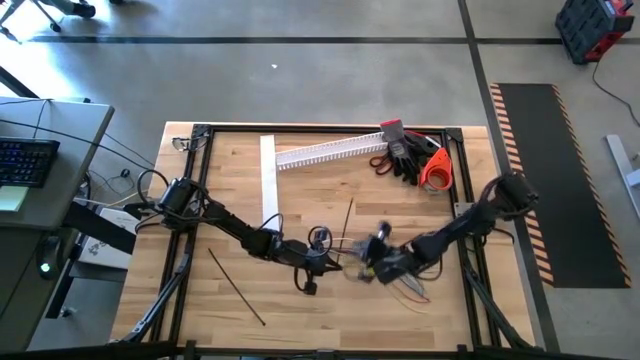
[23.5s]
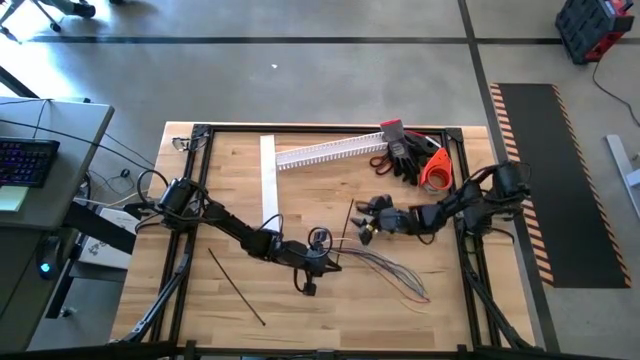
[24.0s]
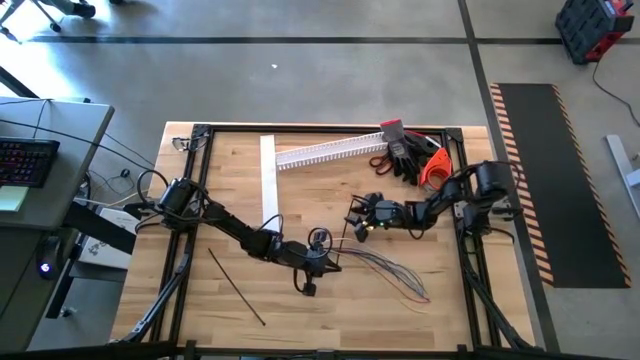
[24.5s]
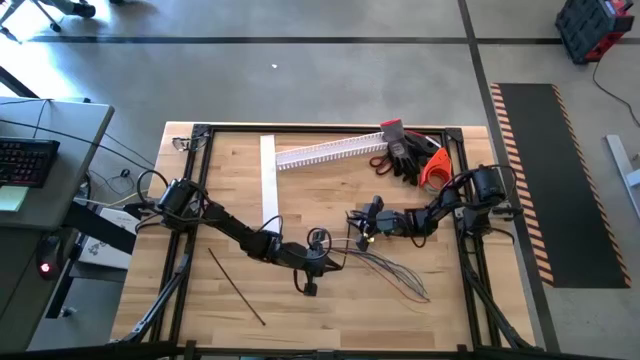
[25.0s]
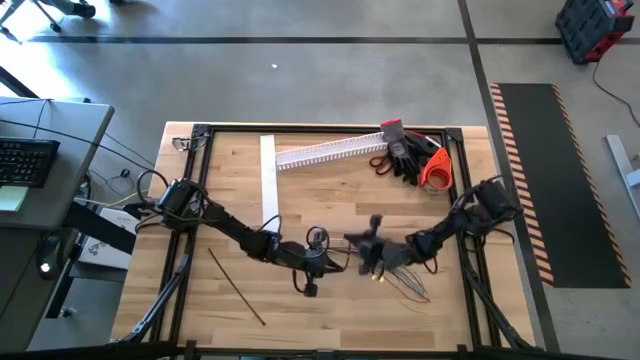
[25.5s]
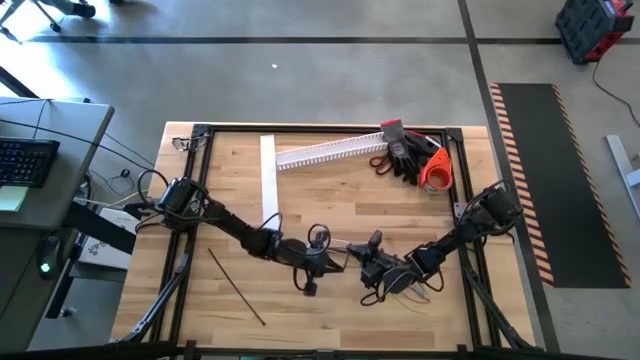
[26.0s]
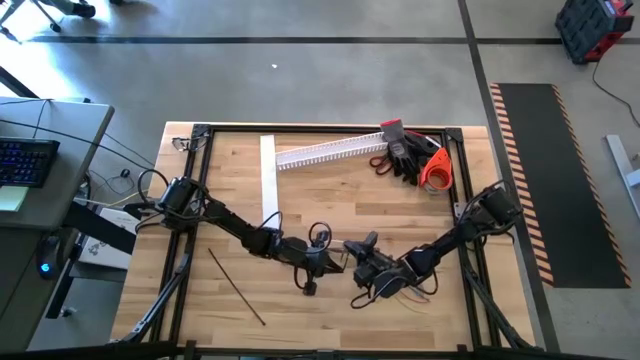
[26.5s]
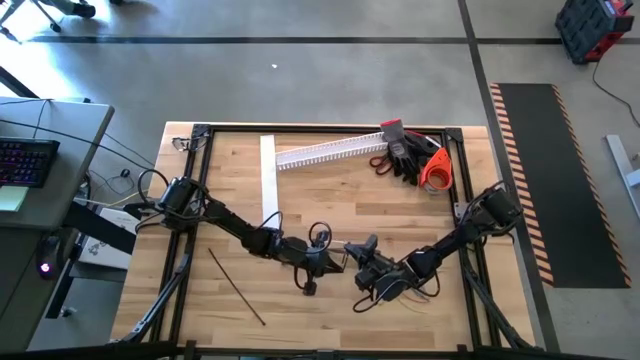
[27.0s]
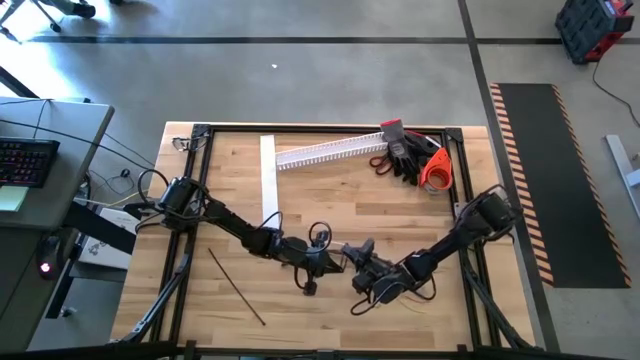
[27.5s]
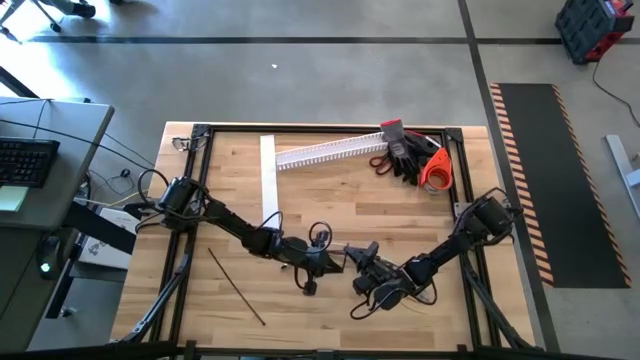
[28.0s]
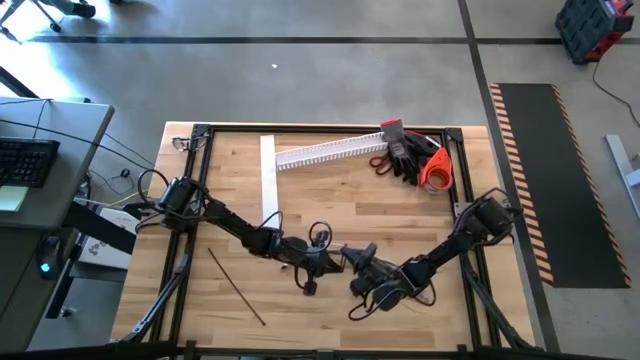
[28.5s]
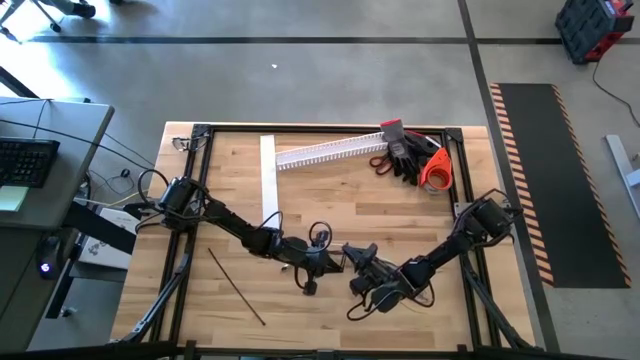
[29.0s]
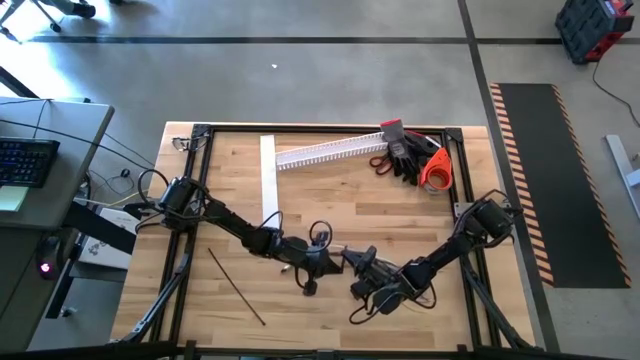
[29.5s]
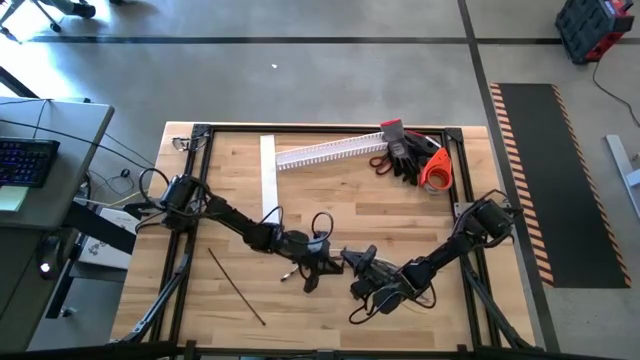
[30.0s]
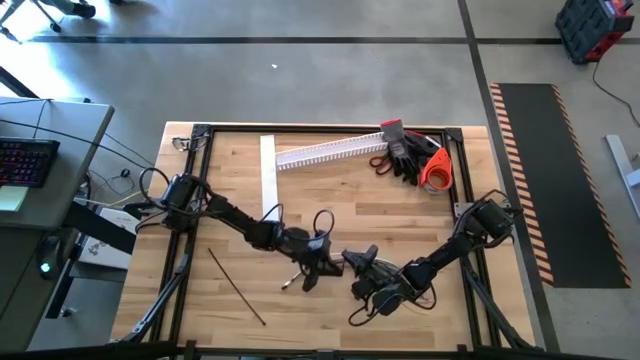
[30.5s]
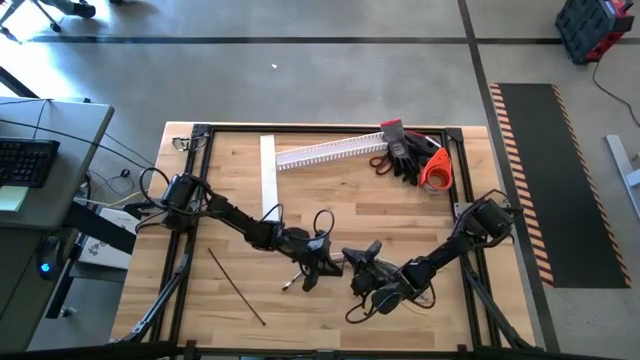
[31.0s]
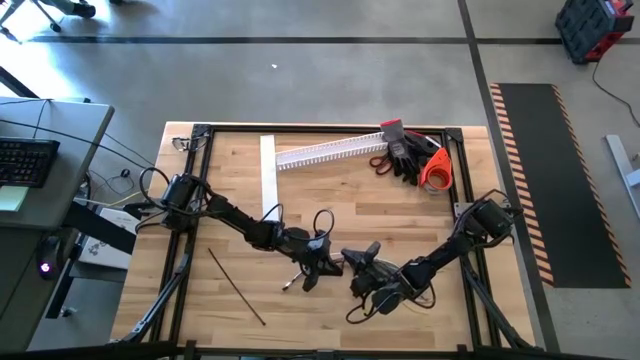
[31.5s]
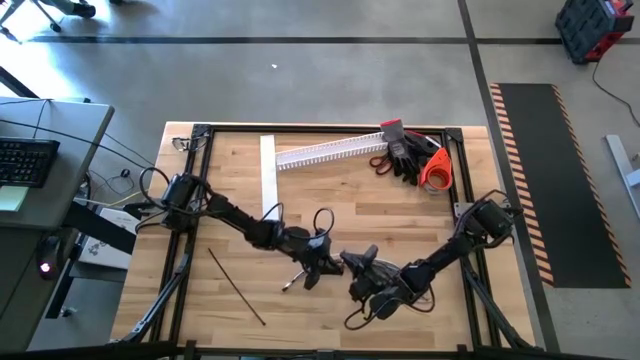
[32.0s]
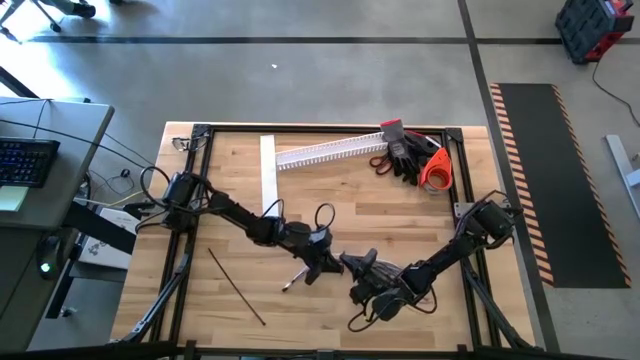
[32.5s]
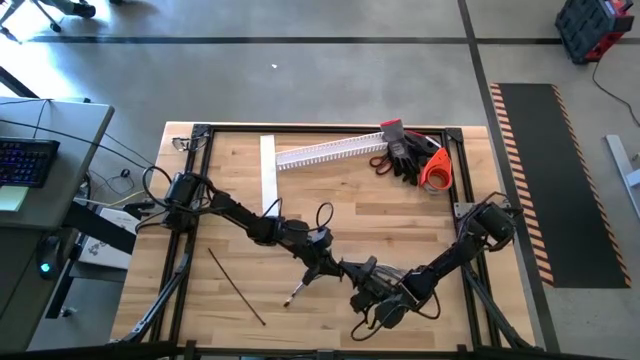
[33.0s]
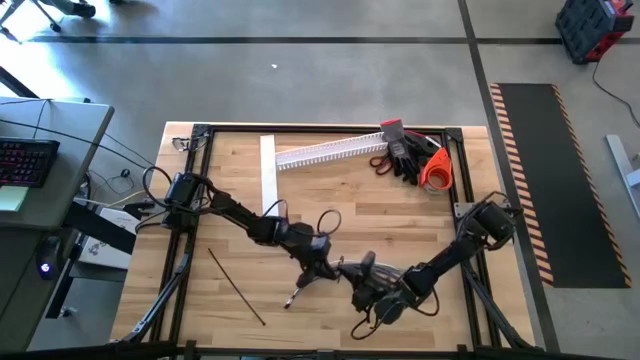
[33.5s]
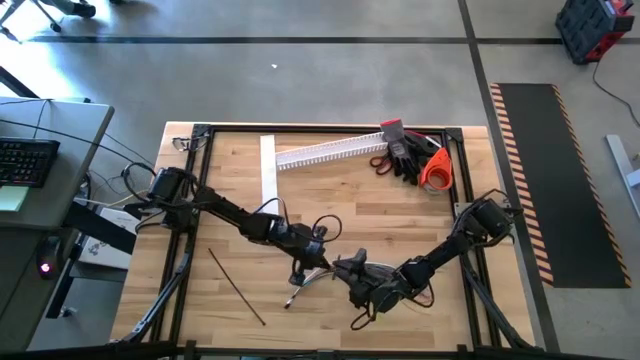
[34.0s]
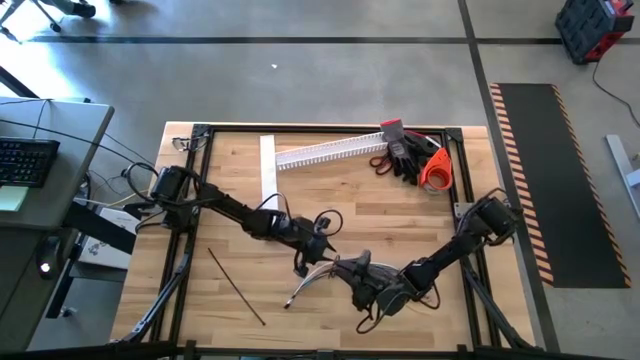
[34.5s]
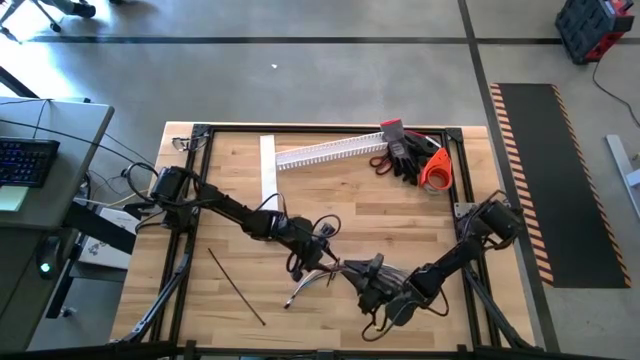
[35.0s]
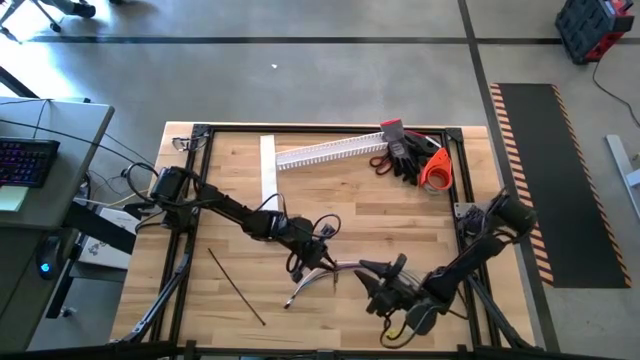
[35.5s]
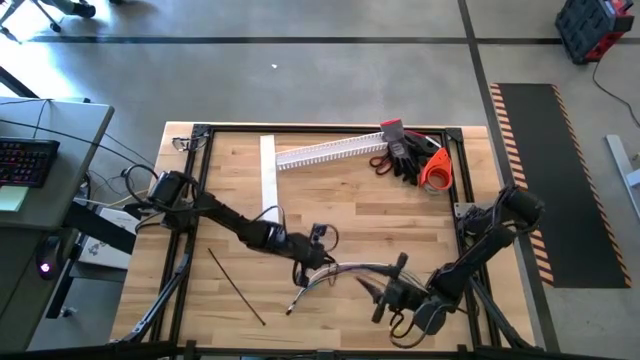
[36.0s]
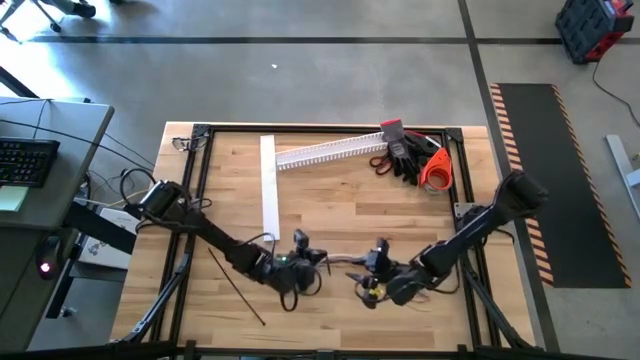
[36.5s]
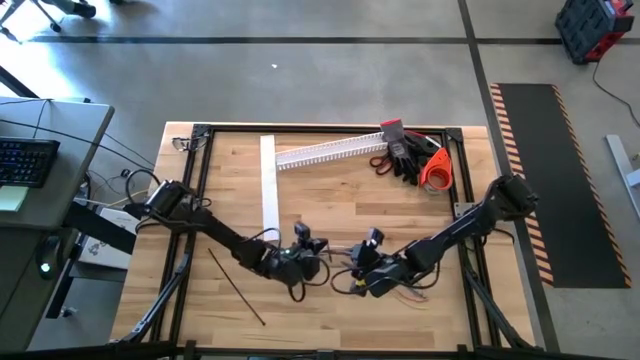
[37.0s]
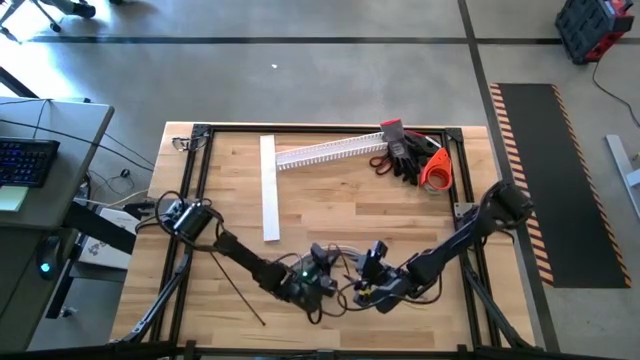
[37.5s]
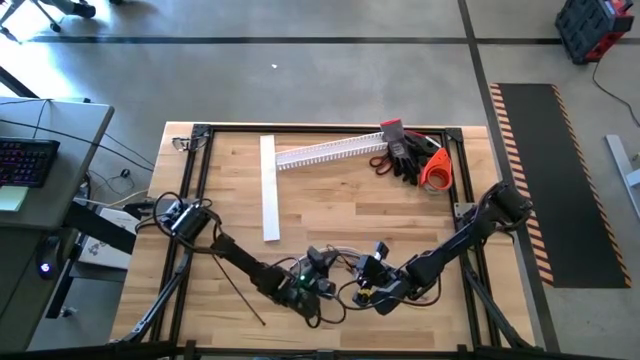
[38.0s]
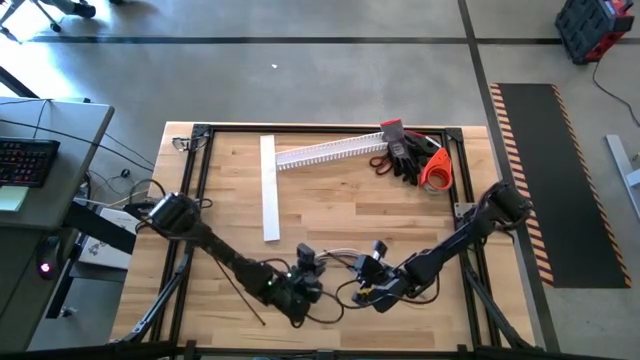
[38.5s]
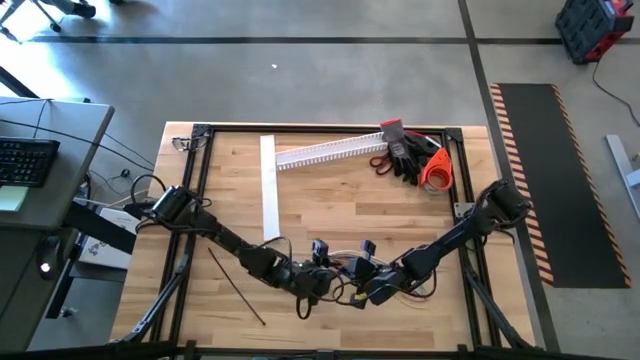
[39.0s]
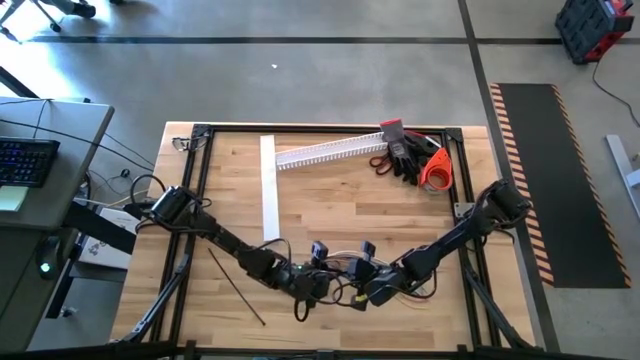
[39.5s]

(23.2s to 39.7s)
Task: Ziptie cables
Wrap the cable wires with the black zip tie

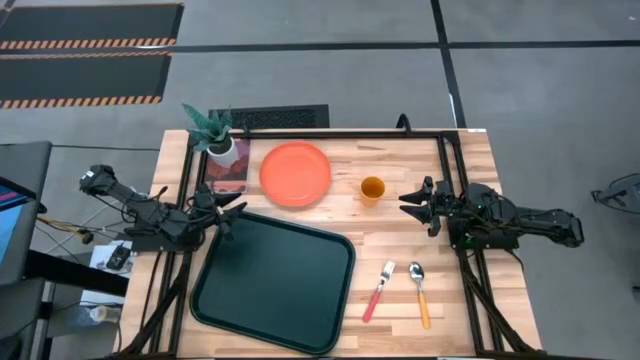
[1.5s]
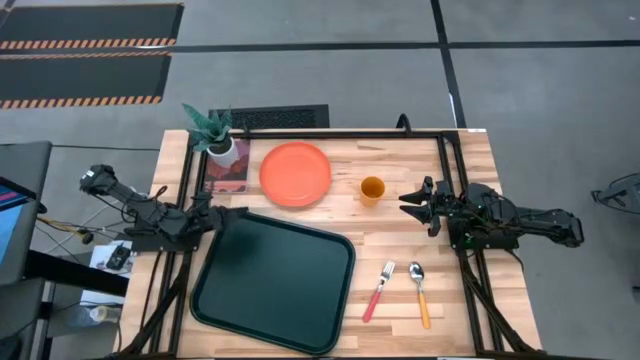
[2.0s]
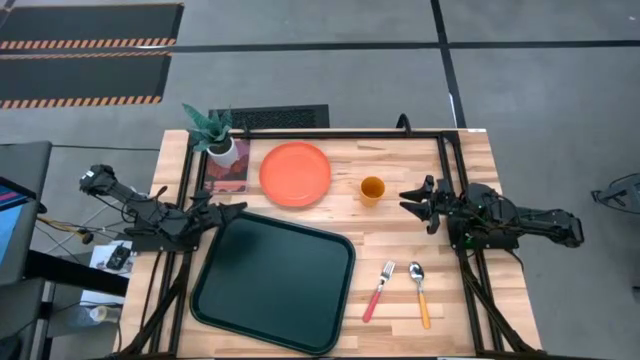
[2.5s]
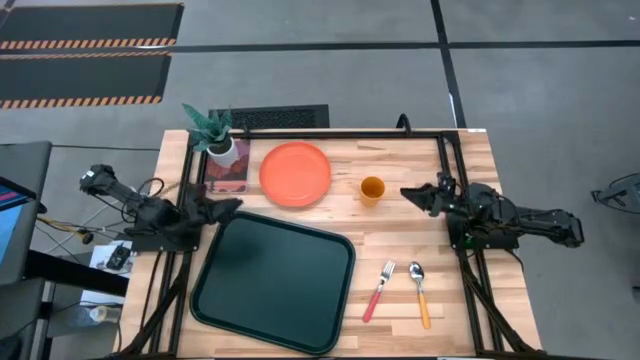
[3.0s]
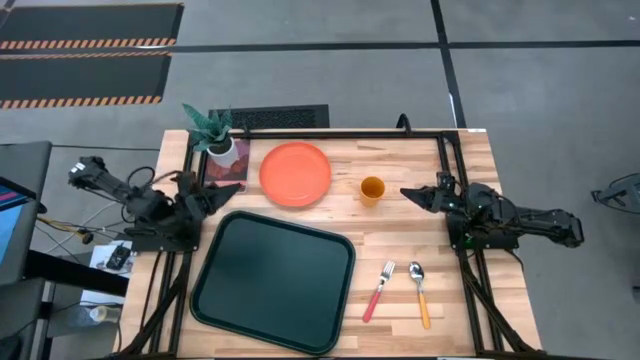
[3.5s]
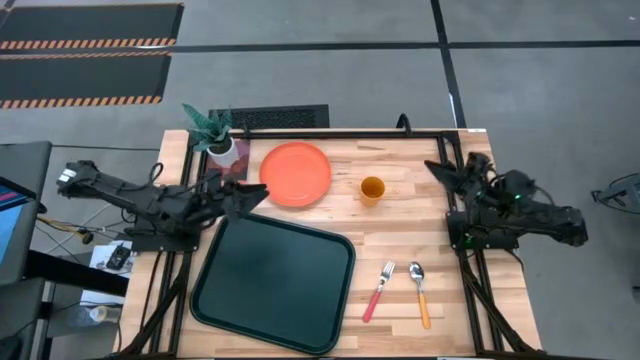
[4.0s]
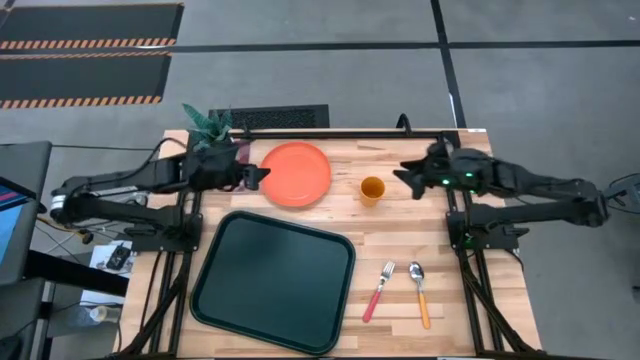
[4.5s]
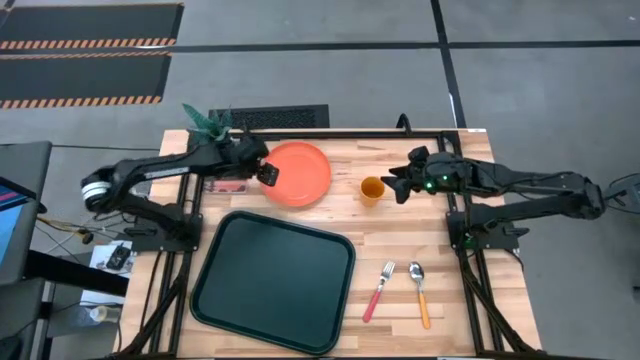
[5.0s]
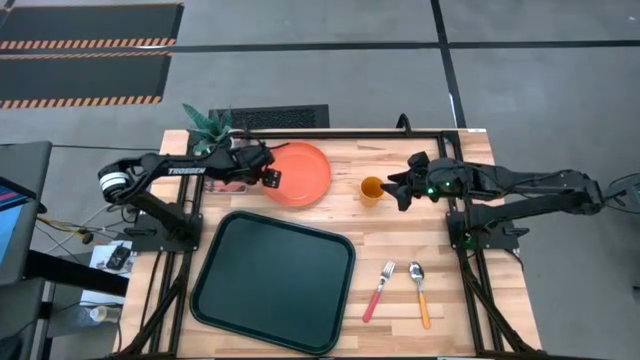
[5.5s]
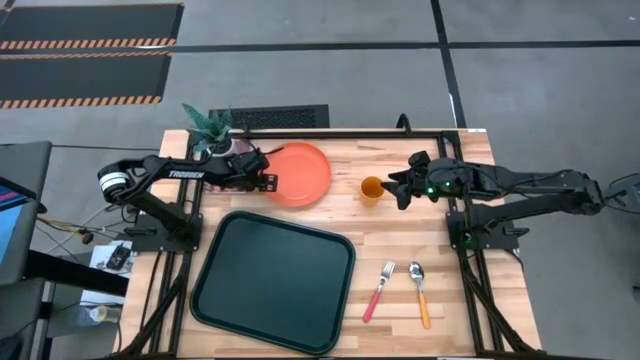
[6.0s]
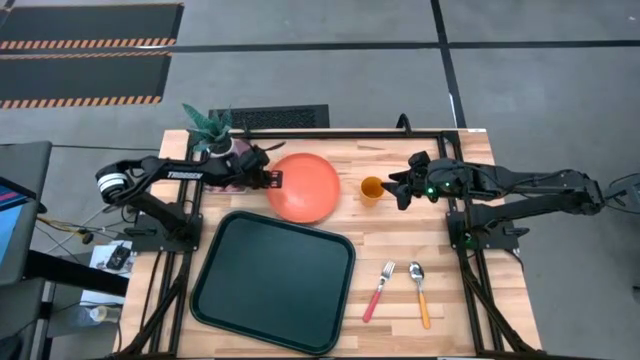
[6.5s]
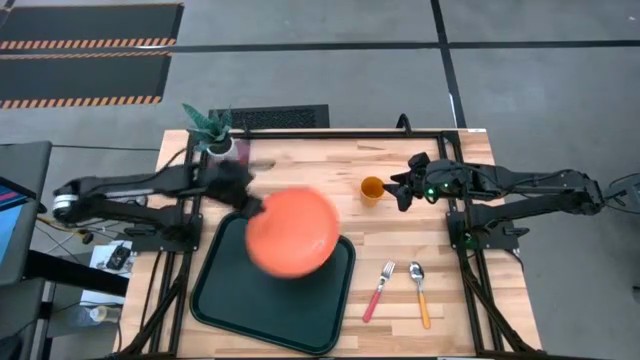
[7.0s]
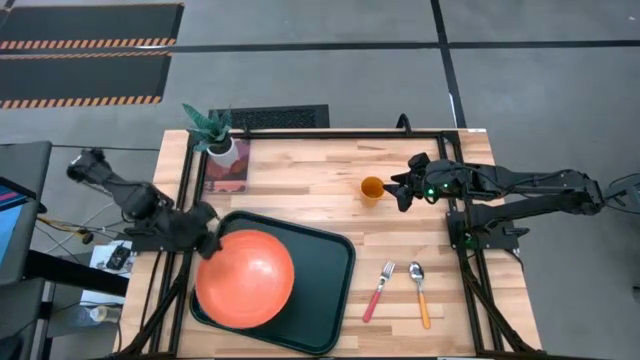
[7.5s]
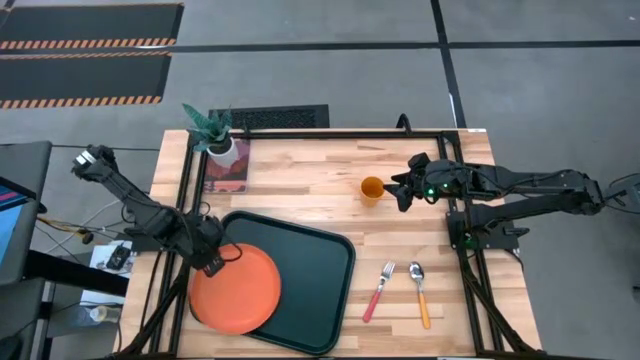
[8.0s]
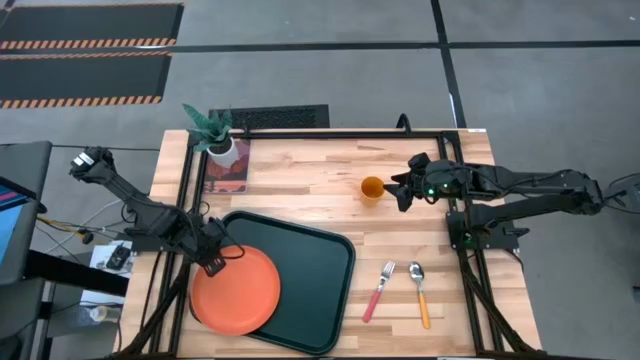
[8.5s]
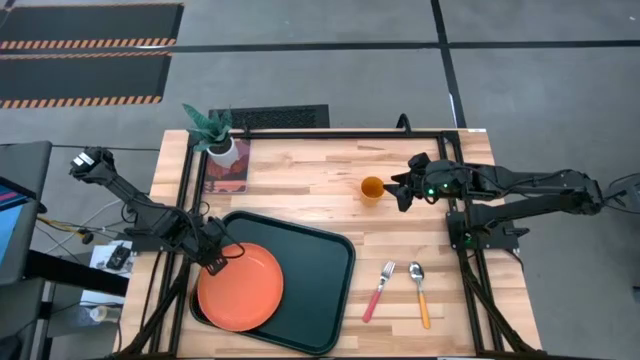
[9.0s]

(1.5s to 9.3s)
Task: Pick and place plate/cup/fork/spoon on tray
Put the orange plate on the bottom left of the black tray
